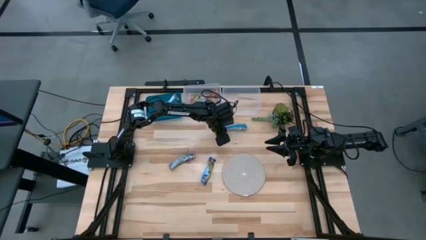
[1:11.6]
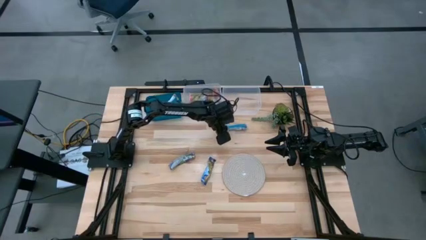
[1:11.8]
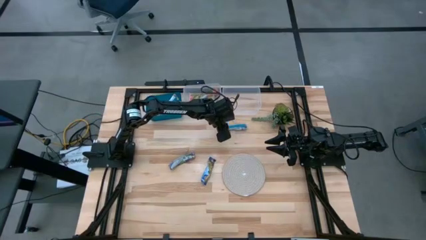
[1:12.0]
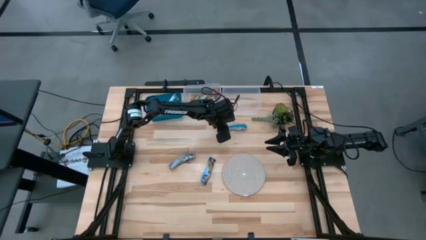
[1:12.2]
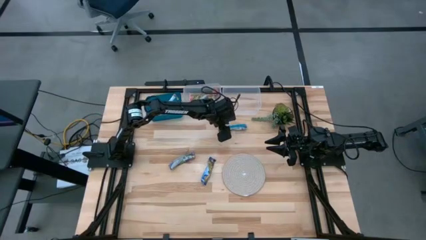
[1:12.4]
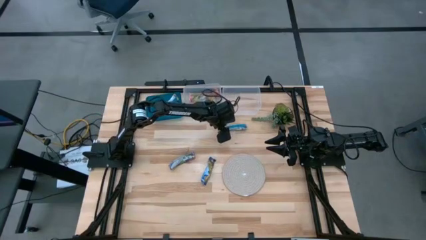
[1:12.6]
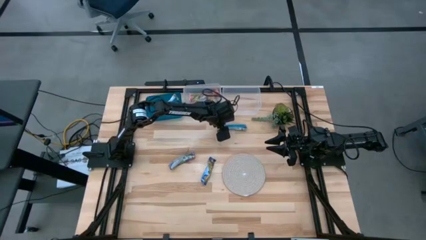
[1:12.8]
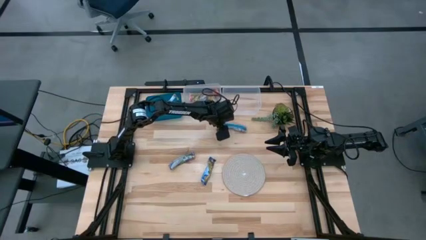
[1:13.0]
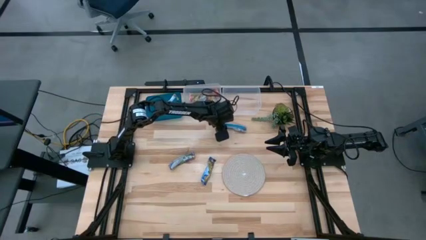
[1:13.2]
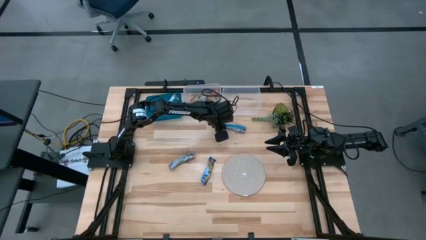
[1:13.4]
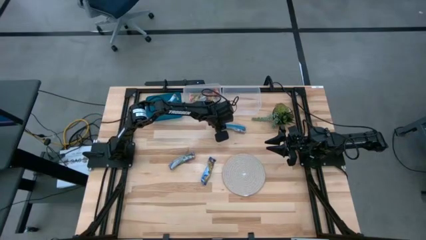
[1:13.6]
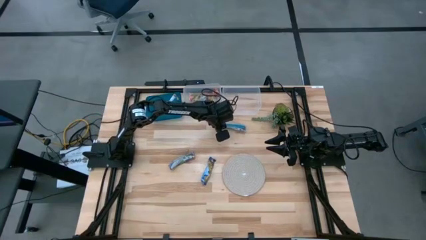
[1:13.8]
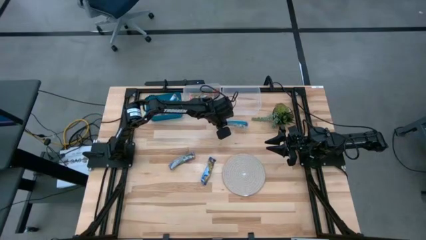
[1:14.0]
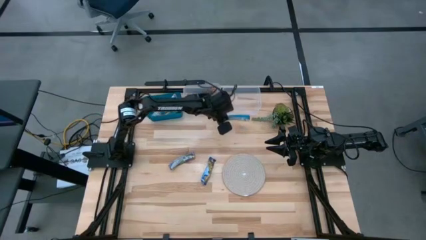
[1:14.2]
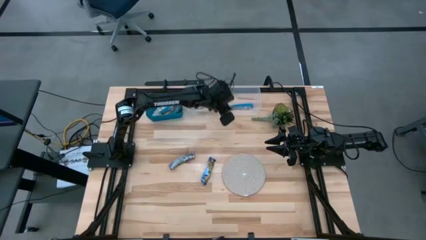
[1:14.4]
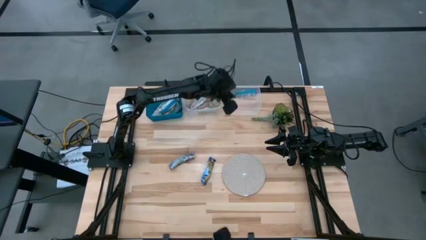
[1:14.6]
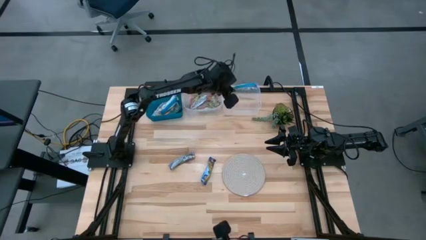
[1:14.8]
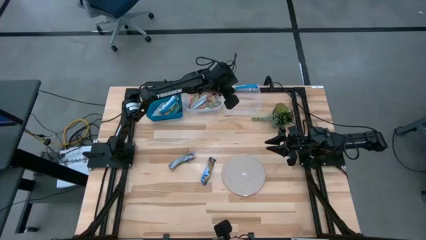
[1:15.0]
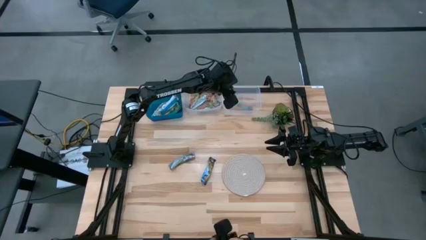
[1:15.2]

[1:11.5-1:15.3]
Task: Pick and place Granola Bars by type
Put the blue granola bar into the right transparent bin

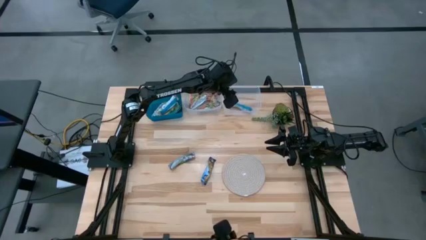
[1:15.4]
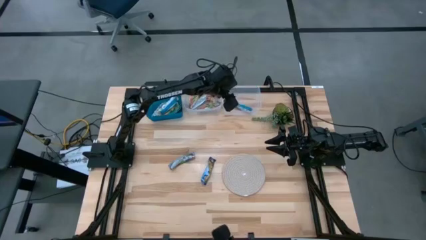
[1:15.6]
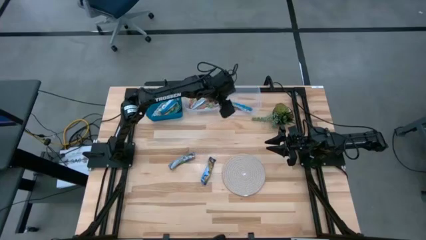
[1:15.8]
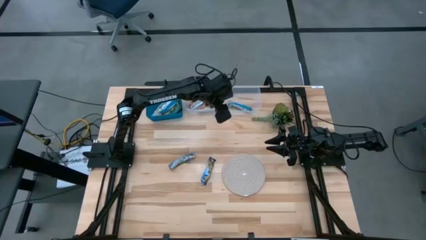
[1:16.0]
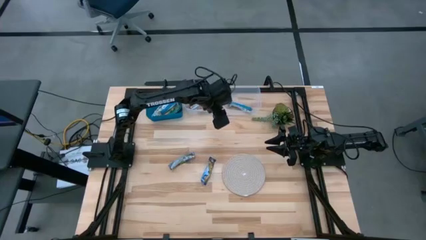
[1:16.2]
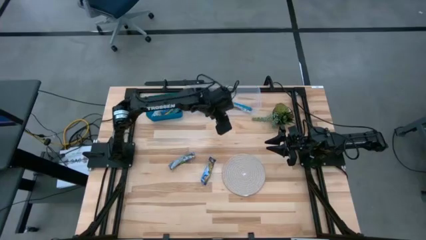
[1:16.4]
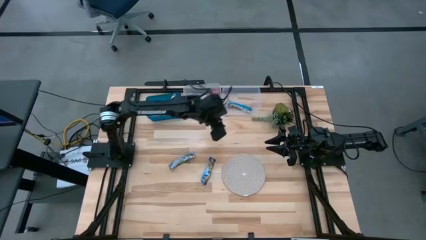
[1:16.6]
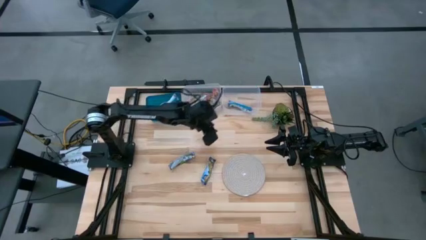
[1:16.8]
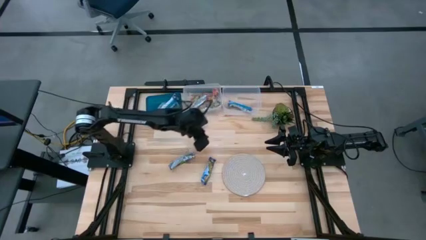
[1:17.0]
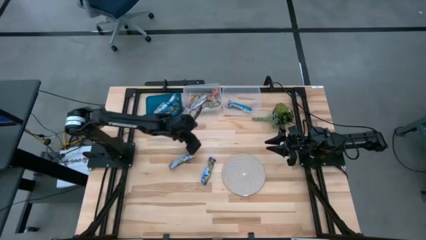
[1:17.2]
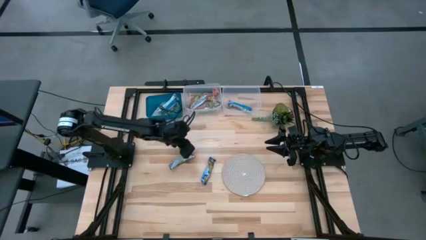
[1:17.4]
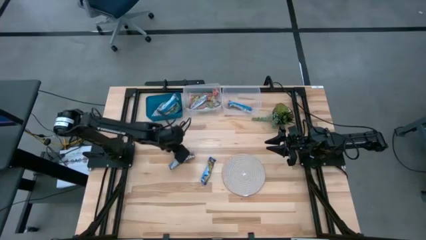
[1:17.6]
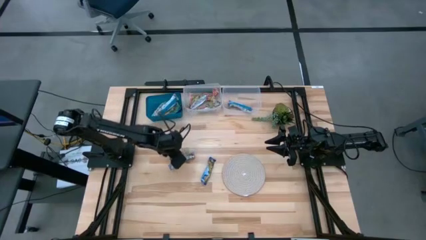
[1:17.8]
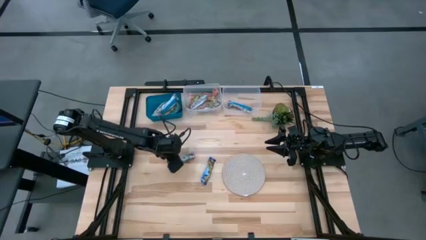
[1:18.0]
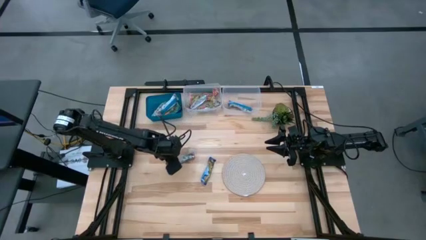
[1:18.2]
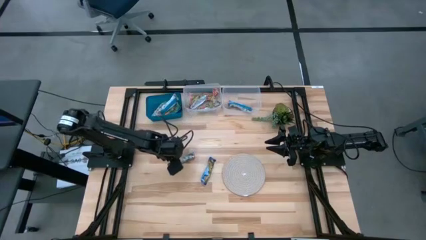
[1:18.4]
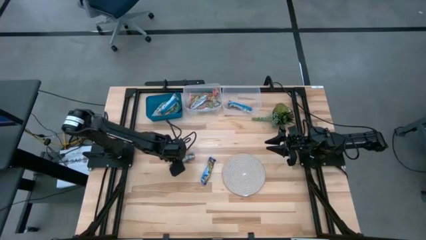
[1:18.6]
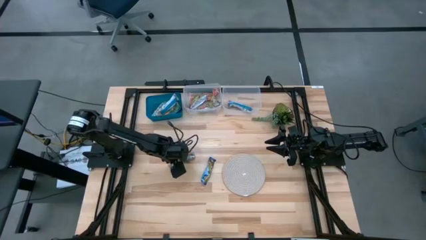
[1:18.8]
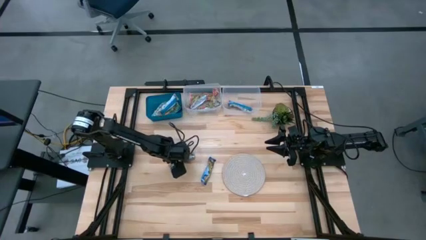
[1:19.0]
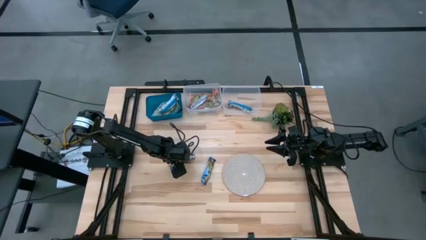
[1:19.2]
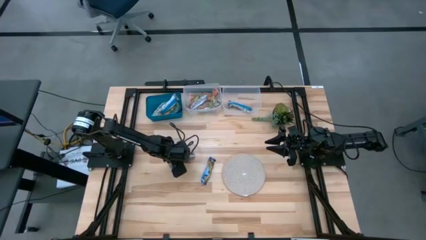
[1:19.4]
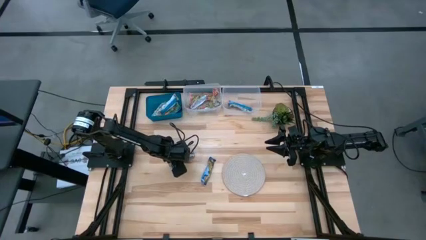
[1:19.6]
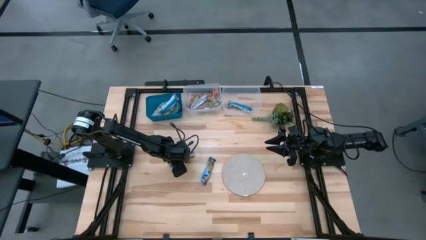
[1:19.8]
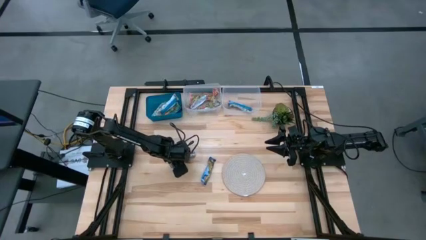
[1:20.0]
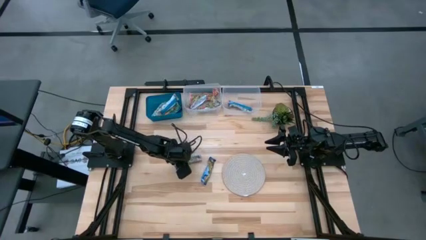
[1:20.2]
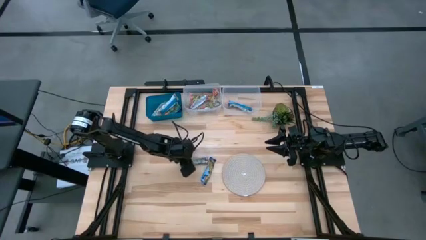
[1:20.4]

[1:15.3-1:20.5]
Put the blue granola bar into the right transparent bin

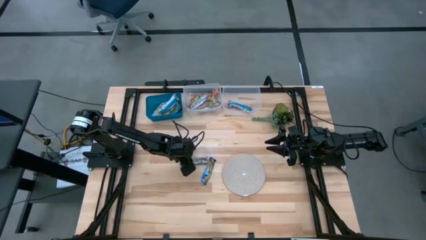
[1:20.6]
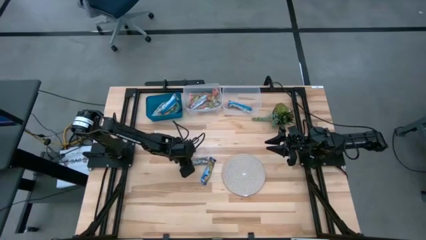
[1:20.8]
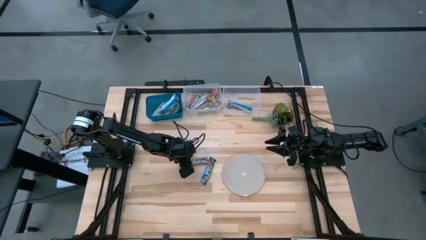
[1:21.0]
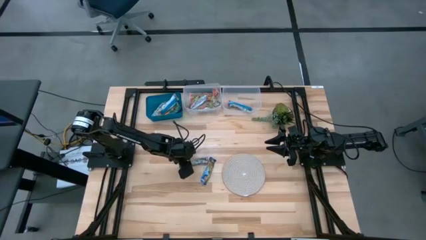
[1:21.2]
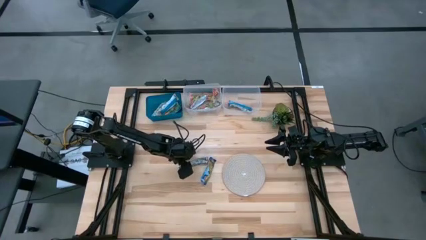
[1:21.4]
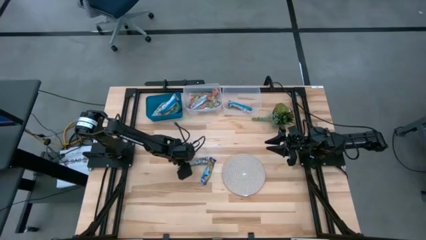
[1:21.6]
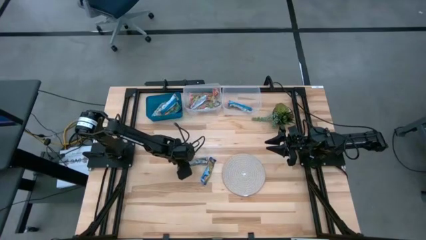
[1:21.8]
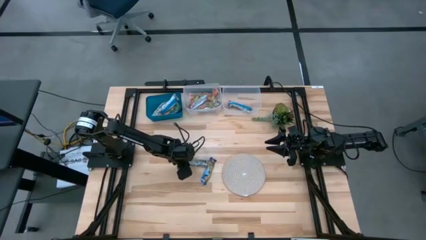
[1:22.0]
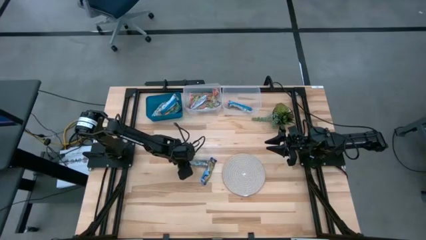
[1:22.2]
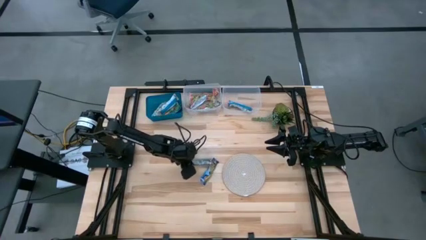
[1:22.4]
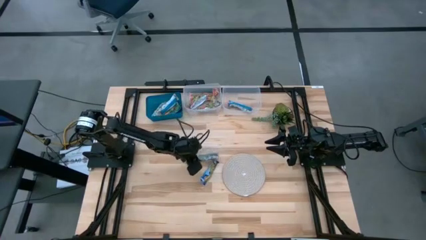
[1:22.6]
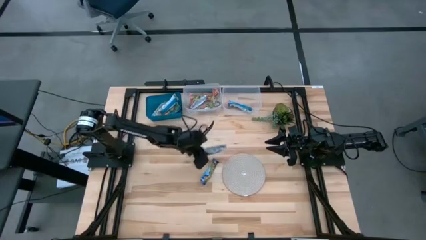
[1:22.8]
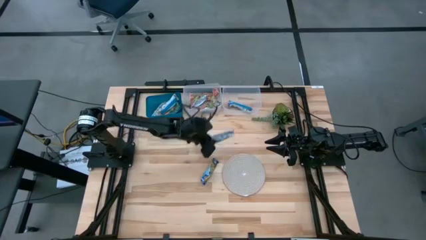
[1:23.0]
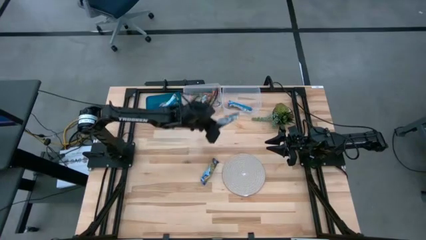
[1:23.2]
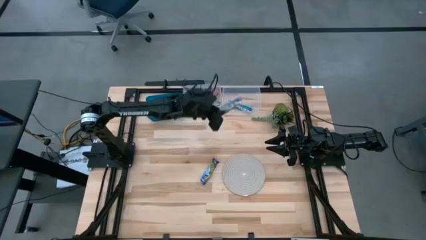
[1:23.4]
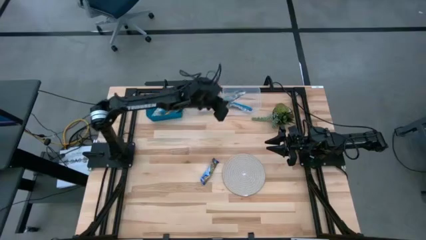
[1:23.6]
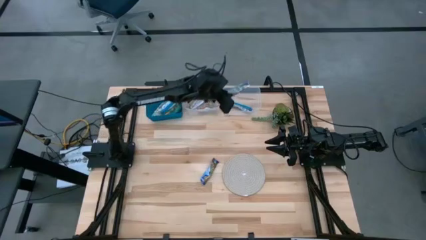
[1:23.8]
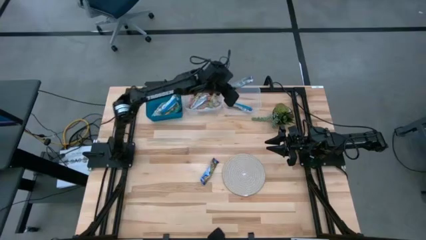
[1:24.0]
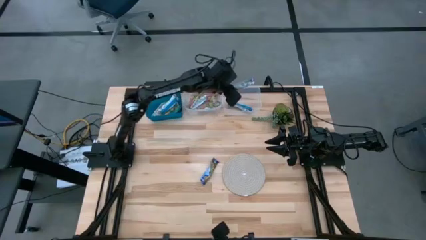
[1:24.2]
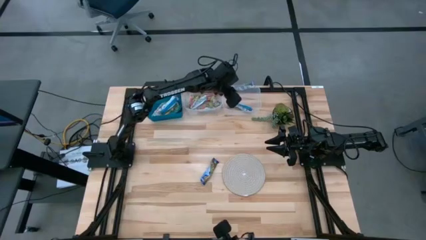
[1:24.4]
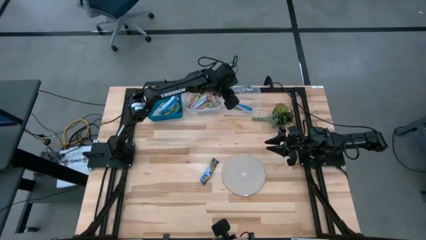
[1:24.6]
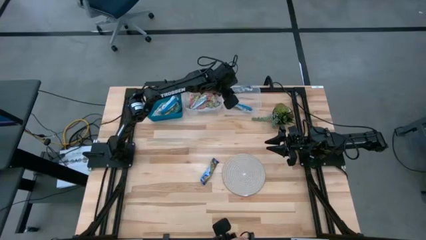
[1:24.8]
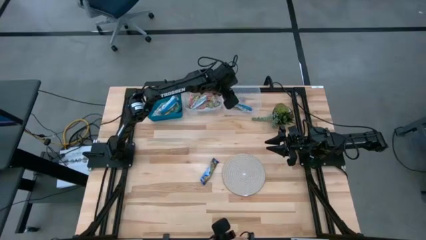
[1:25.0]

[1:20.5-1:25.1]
Put the blue granola bar into the right transparent bin

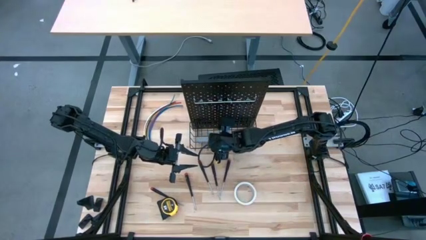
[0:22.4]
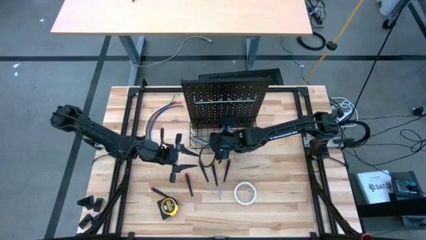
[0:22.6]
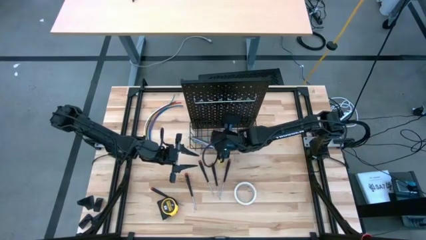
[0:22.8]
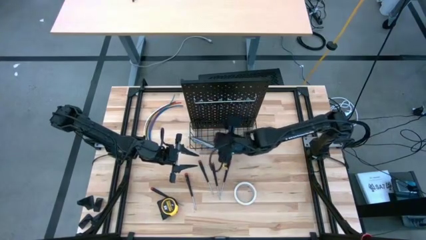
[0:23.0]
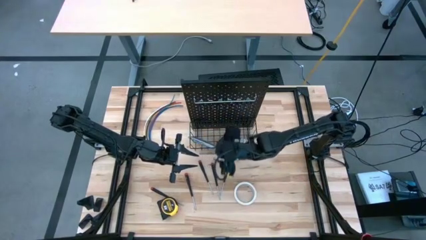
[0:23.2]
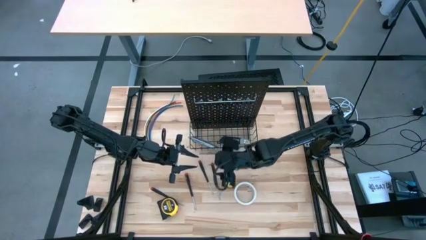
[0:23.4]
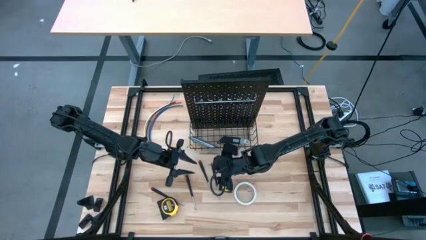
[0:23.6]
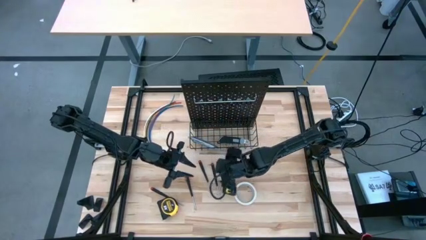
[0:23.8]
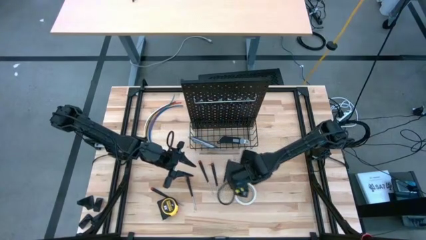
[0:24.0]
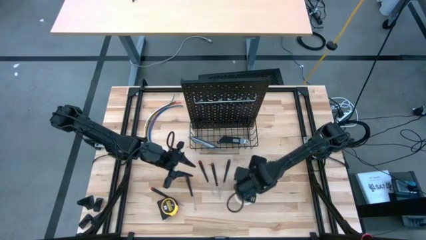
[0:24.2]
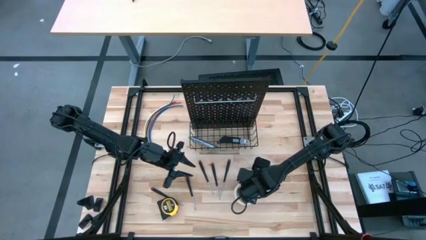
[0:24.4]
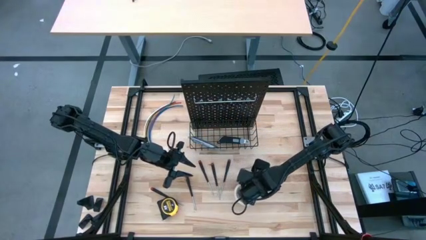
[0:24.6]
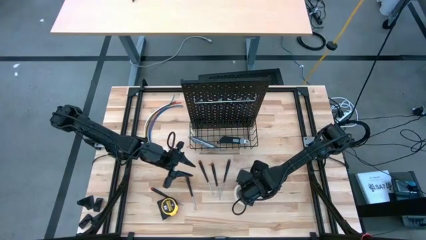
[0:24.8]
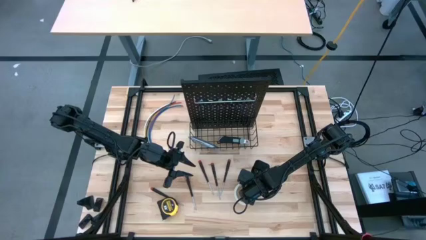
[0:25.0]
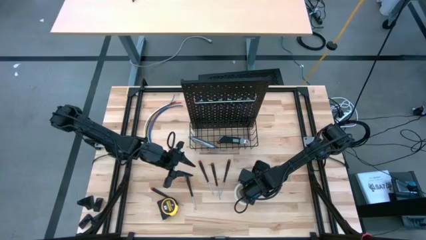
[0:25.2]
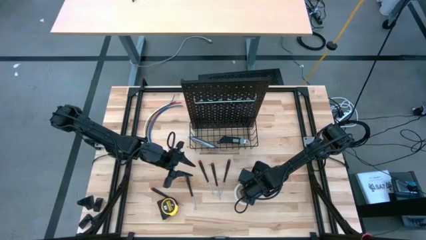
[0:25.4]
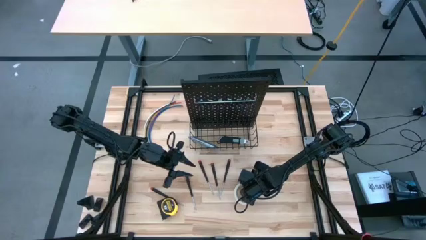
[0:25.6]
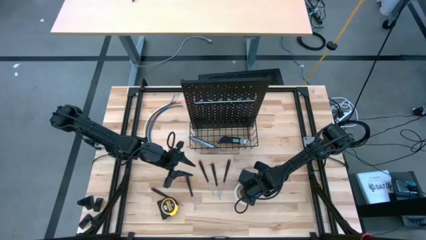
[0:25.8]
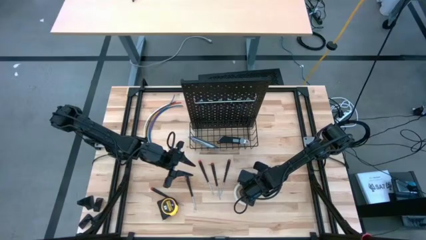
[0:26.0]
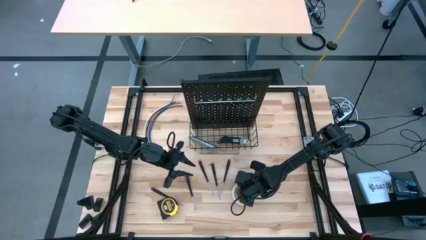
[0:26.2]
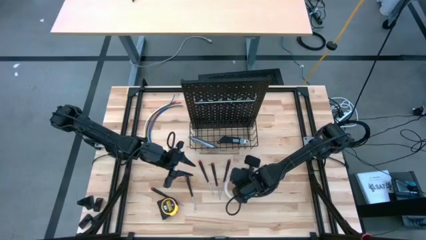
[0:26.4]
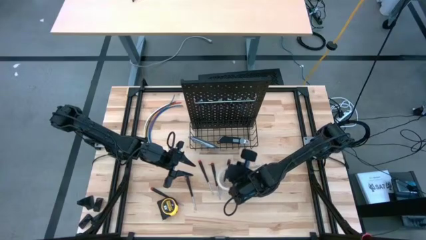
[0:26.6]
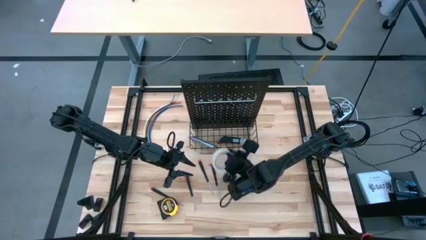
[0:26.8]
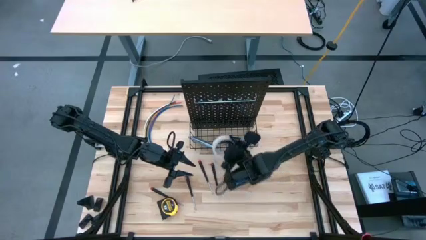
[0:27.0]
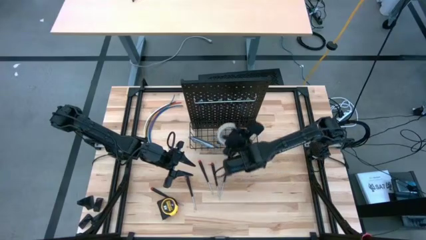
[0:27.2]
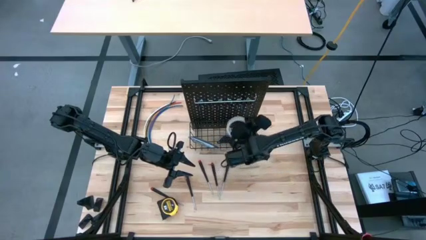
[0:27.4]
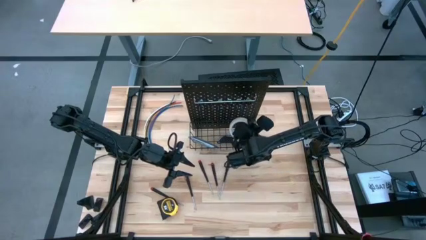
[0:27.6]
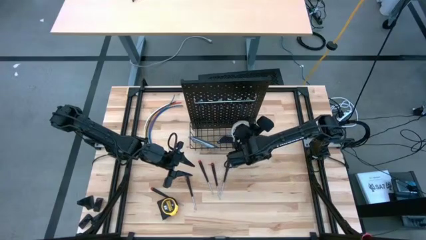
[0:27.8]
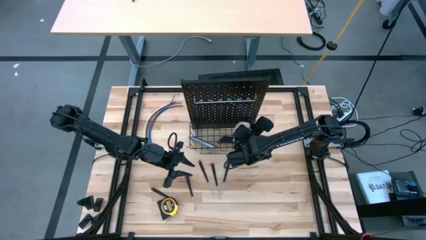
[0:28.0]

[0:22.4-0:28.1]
Task: Hang tools onto peg board
Put the white tape into the wire basket on the pegboard
